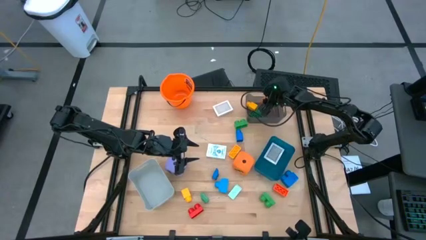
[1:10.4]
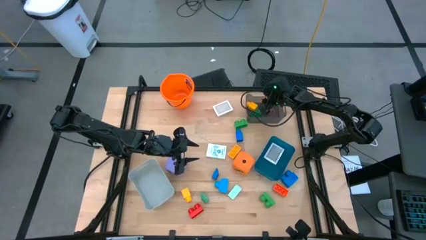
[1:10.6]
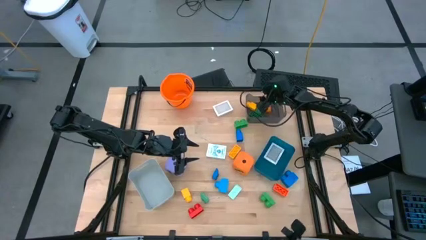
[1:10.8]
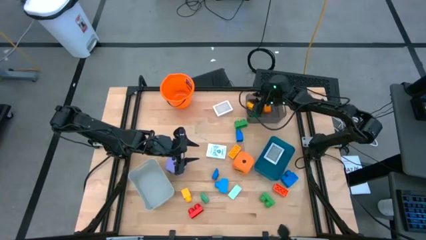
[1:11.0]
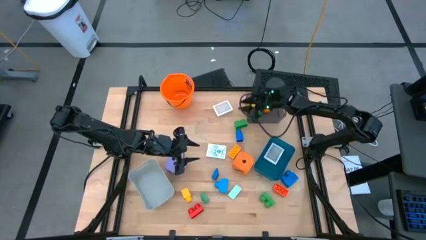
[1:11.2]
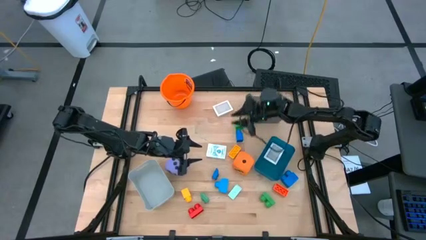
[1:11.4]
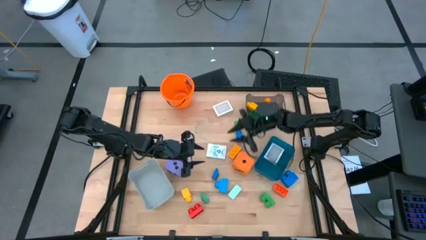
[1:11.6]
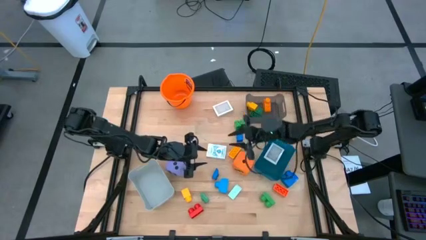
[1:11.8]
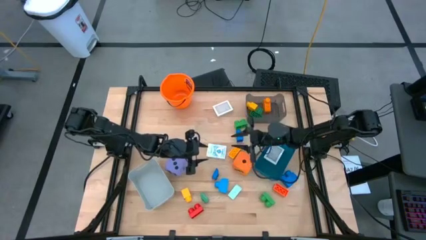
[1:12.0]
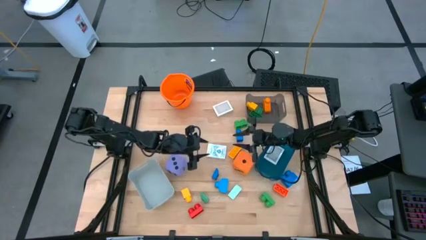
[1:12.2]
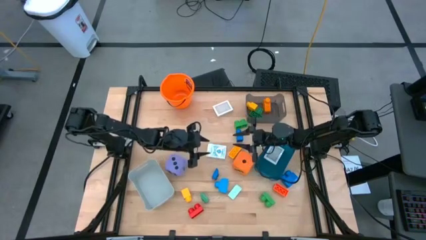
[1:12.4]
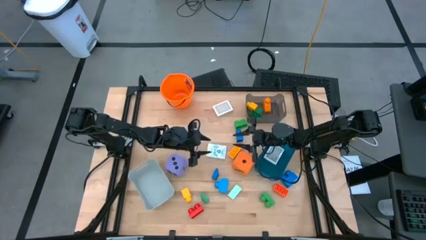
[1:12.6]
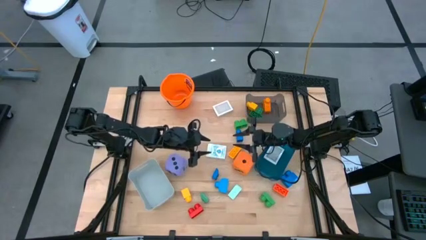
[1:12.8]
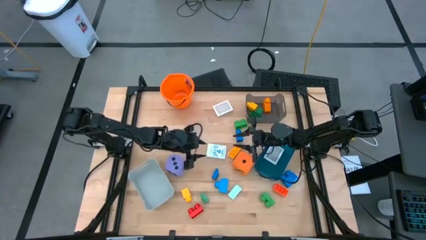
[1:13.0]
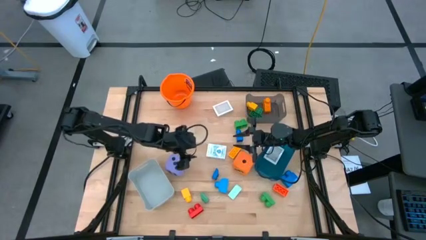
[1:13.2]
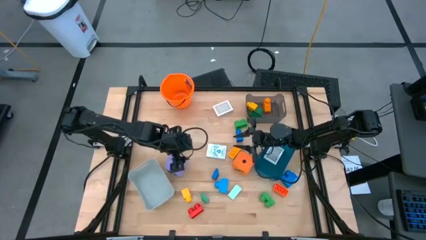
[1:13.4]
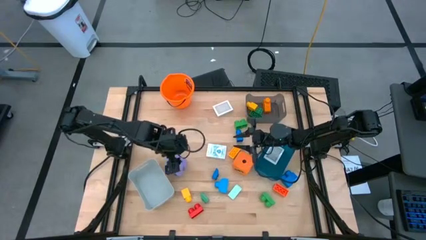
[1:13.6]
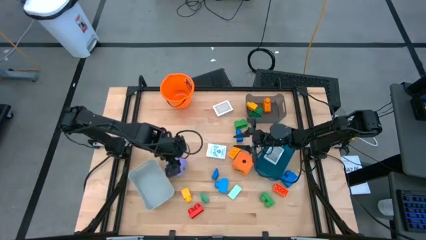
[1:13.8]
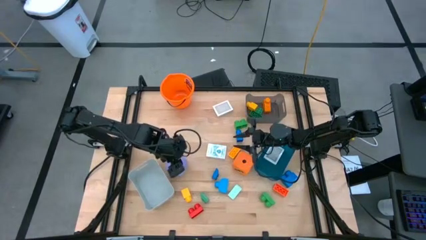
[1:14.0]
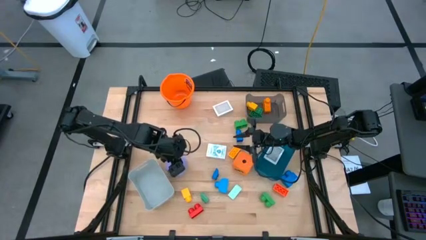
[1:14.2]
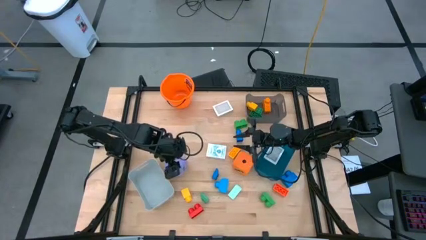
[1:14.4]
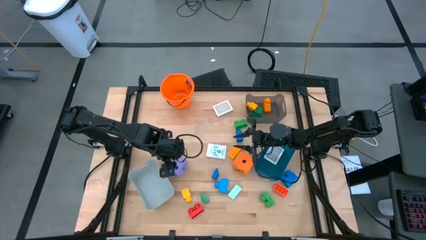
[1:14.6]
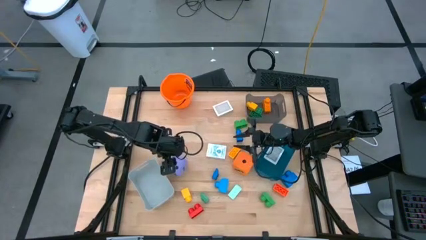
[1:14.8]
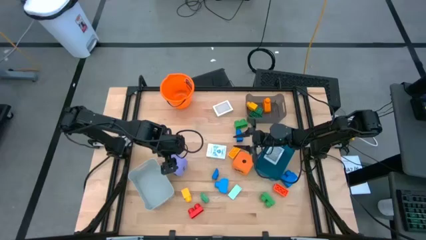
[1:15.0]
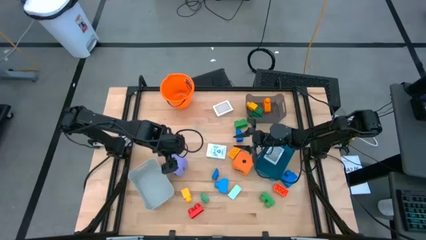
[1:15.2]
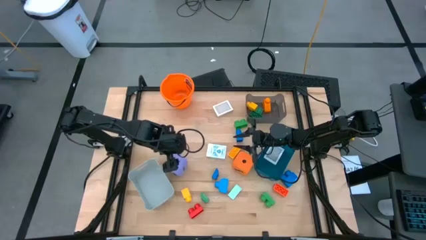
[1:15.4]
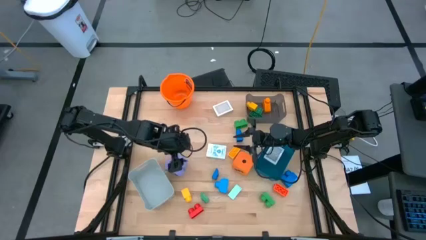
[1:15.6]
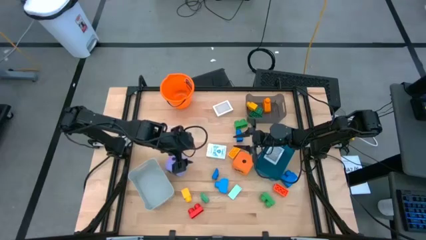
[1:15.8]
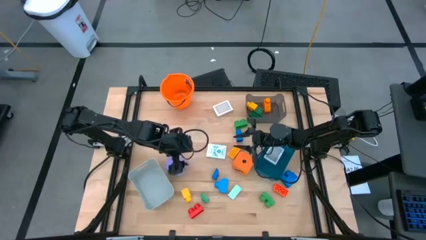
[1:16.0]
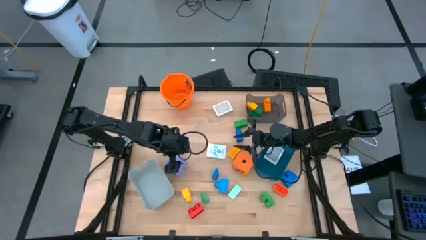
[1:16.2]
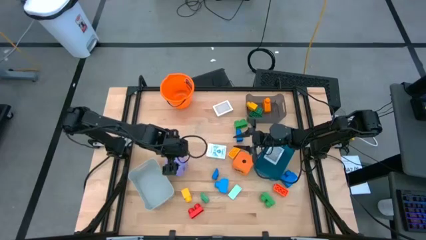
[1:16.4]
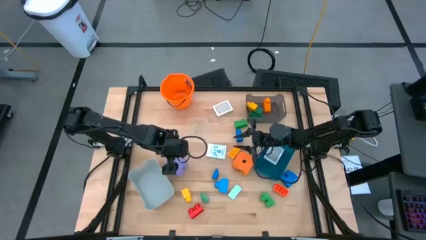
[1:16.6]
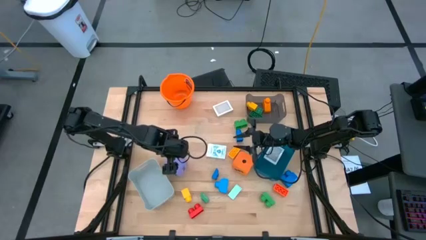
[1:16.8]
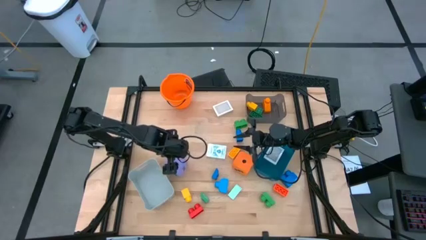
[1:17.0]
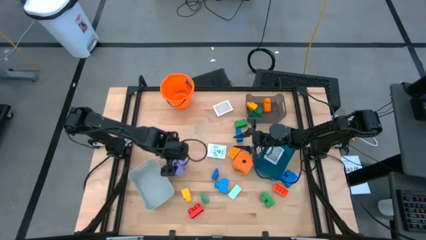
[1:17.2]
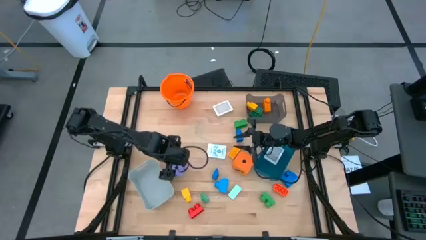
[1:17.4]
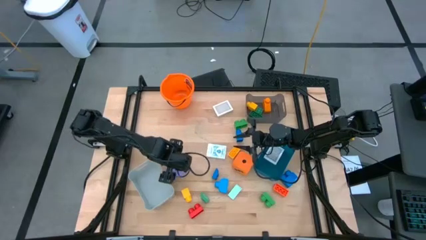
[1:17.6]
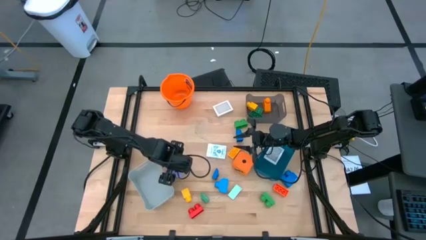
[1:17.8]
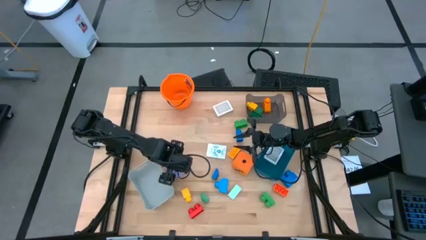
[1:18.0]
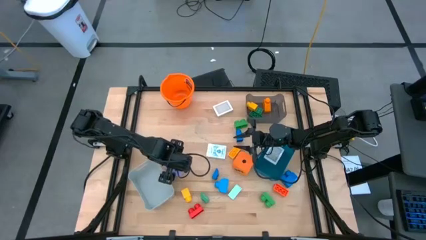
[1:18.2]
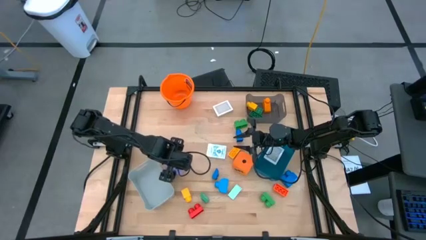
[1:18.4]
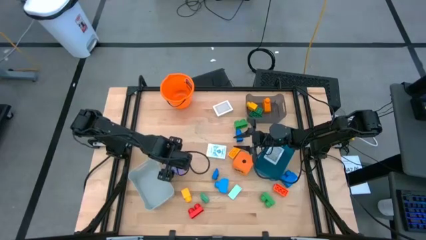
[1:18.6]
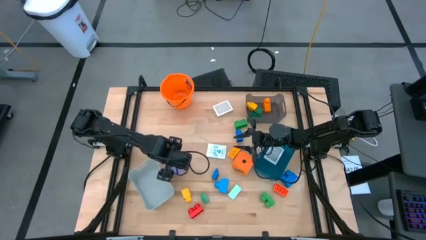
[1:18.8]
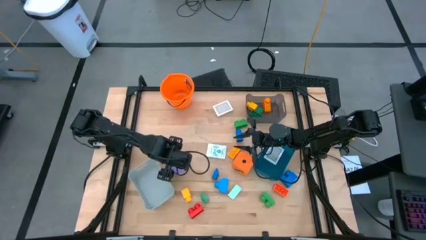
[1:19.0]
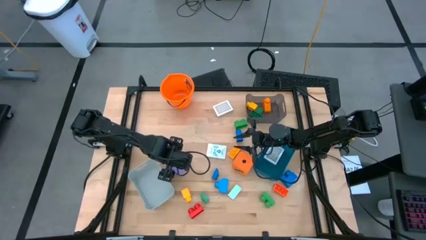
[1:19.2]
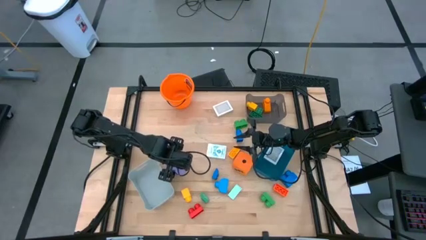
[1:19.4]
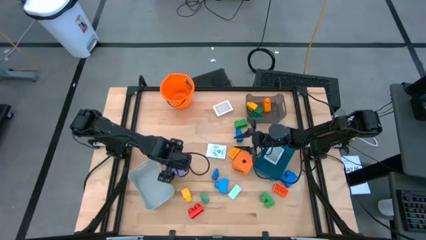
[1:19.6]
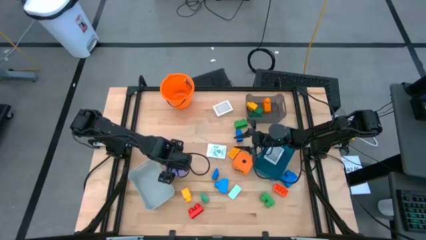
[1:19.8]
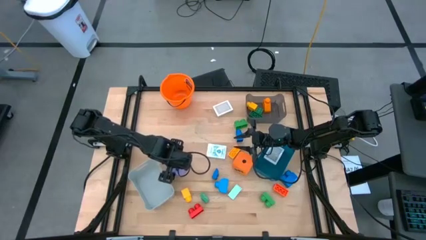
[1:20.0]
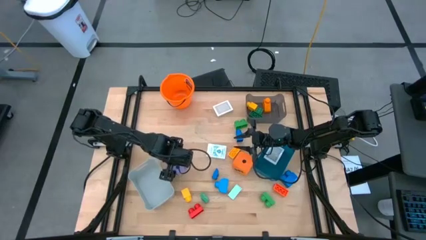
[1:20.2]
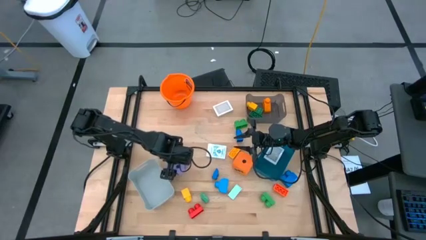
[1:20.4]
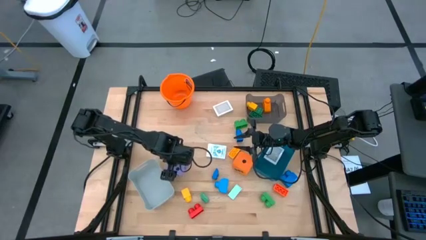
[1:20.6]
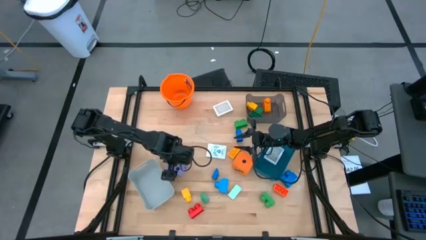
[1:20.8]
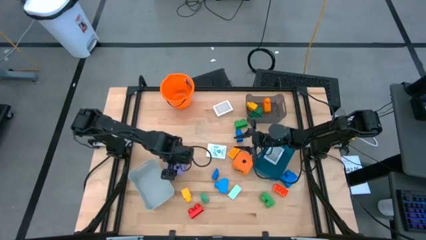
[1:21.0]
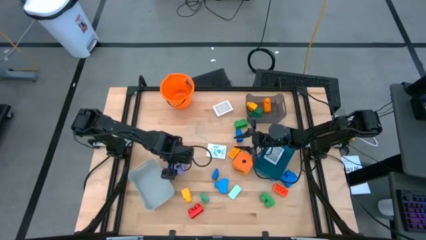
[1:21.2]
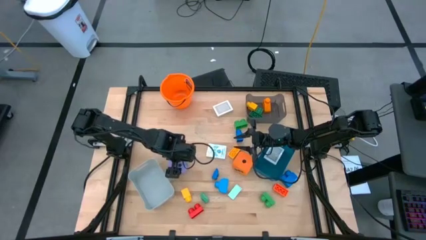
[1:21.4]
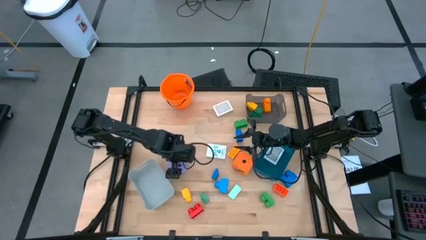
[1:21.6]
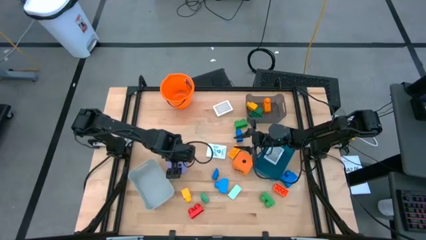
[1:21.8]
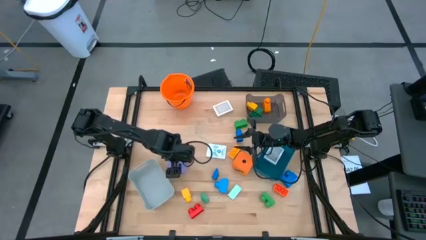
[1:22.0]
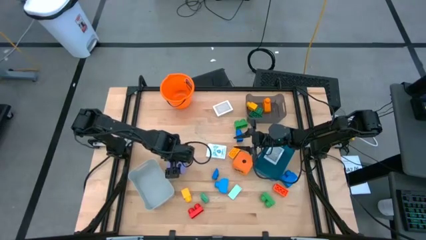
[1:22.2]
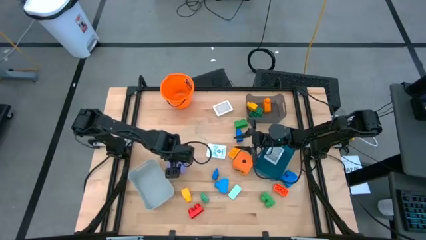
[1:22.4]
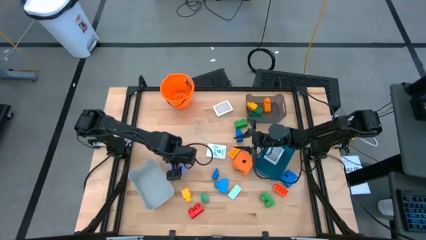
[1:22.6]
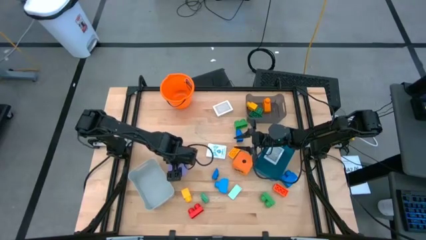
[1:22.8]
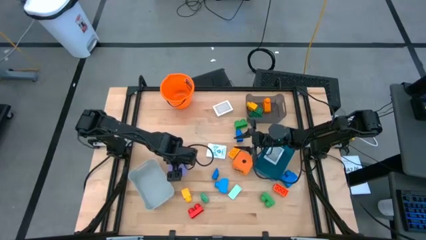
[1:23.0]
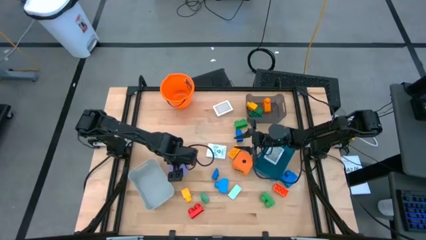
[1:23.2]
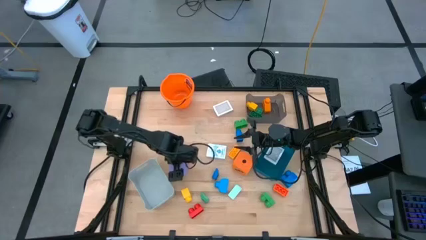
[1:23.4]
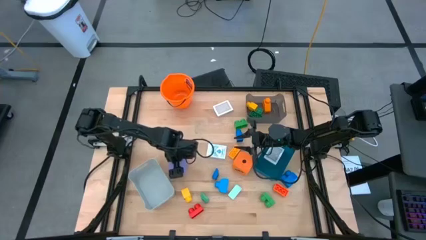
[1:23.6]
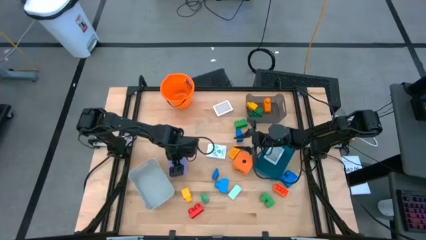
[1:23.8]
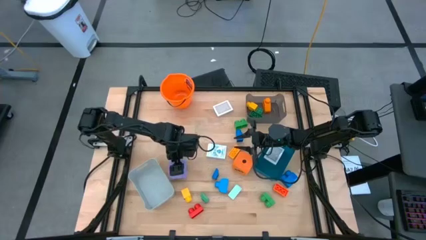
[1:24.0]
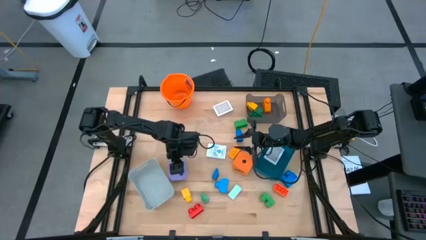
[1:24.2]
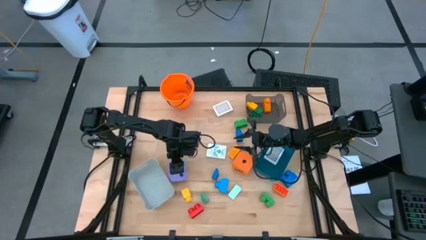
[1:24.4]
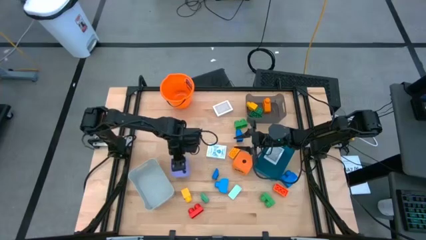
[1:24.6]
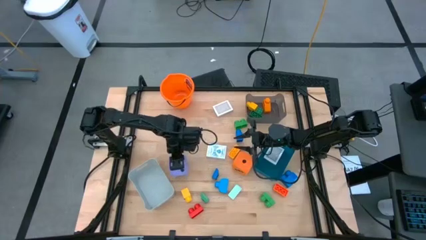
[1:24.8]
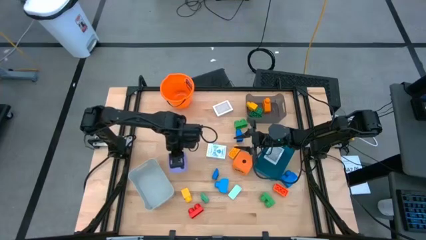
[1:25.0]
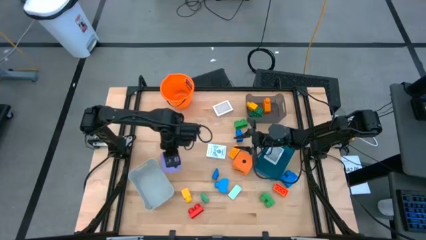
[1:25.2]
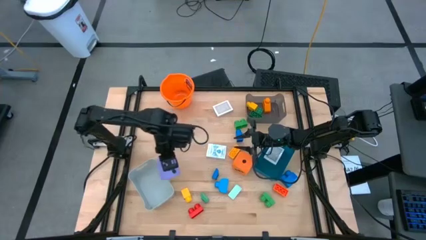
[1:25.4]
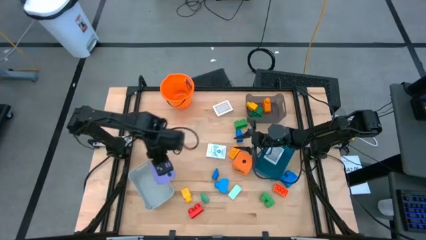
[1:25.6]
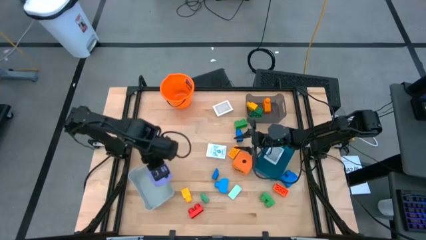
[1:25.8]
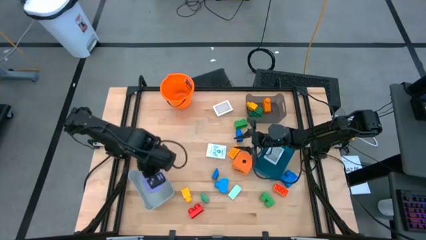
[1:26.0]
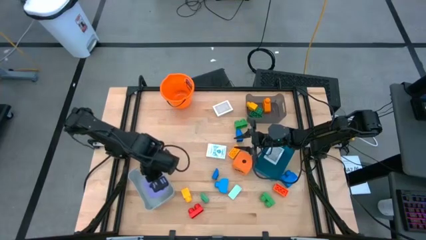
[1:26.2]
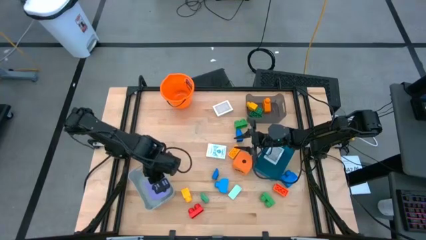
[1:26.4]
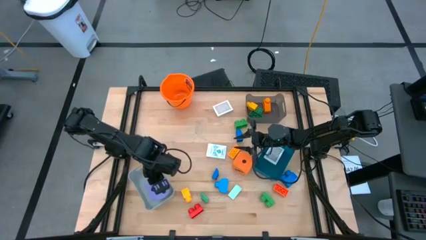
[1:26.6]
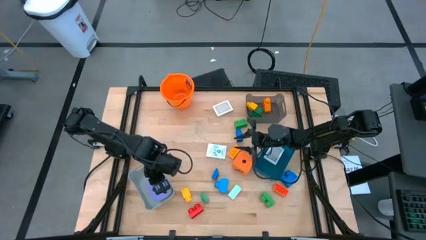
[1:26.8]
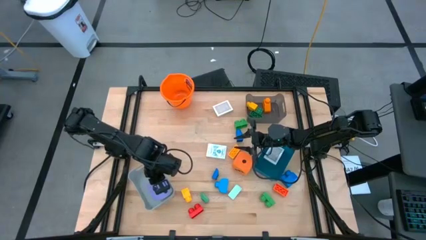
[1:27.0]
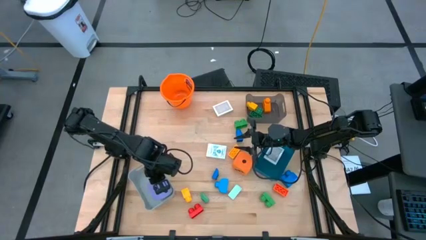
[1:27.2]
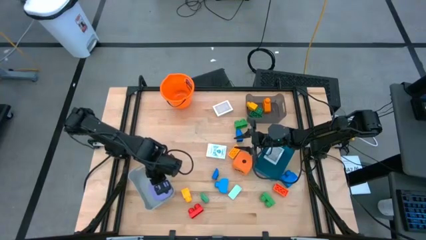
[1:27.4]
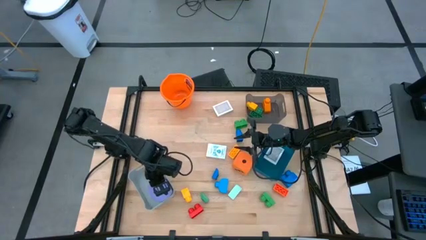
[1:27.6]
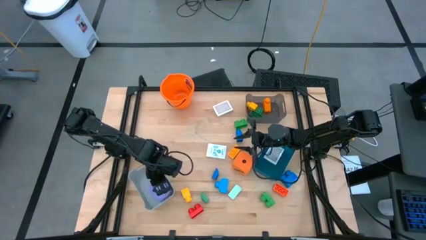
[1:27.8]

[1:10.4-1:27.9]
Task: Pick & Place Toys
Put the purple dice into the gray bin
